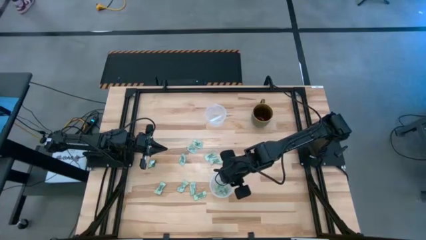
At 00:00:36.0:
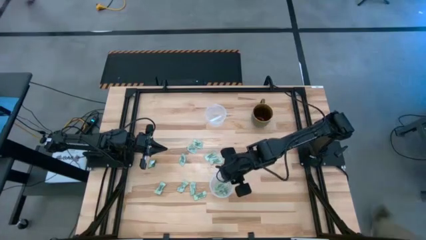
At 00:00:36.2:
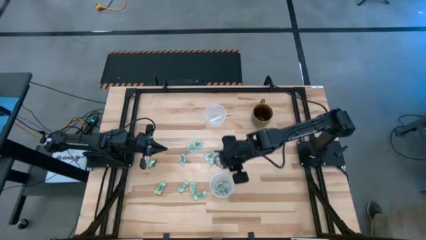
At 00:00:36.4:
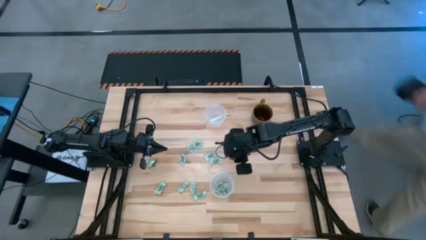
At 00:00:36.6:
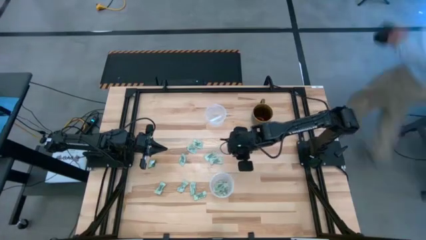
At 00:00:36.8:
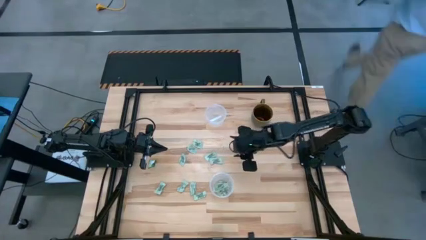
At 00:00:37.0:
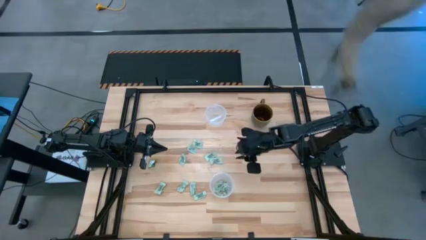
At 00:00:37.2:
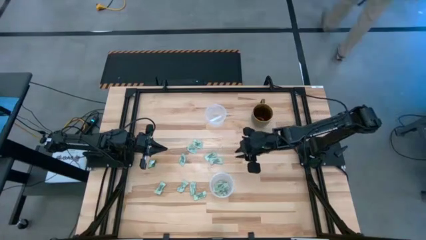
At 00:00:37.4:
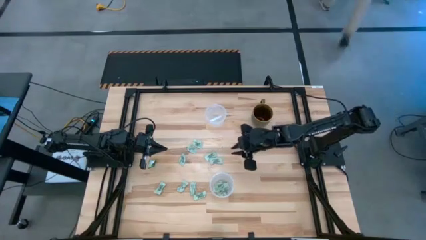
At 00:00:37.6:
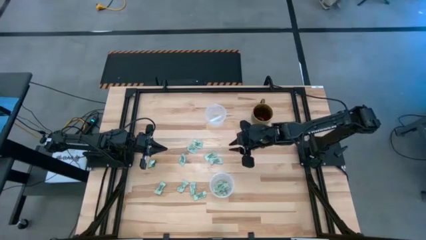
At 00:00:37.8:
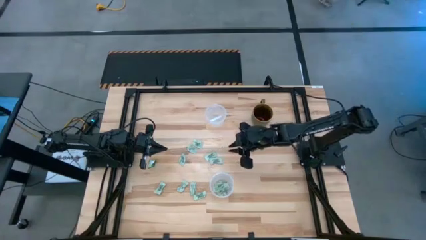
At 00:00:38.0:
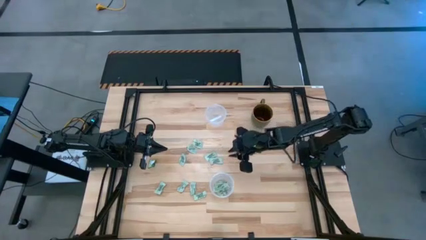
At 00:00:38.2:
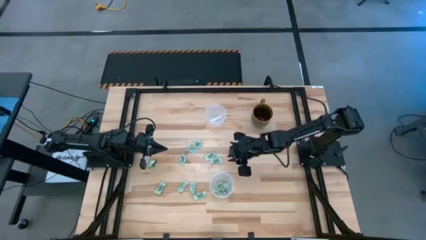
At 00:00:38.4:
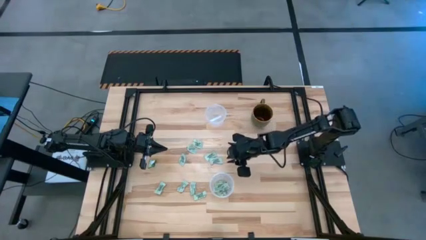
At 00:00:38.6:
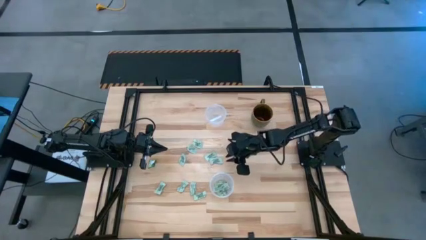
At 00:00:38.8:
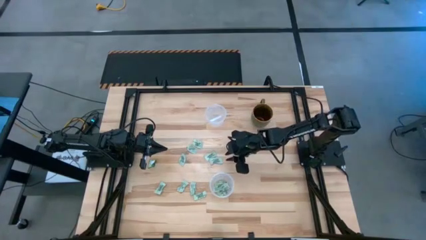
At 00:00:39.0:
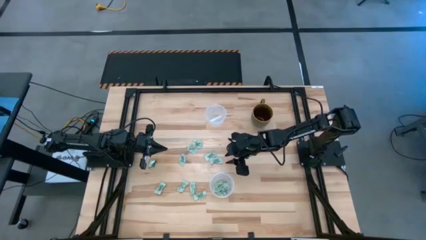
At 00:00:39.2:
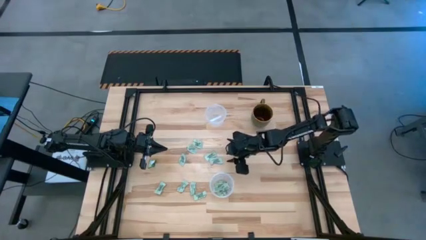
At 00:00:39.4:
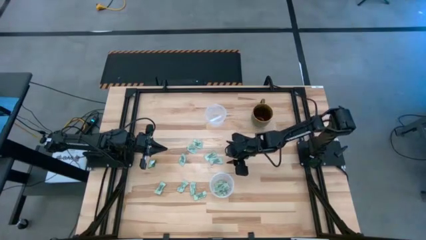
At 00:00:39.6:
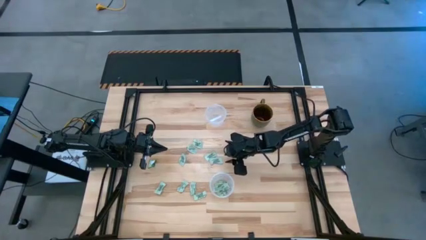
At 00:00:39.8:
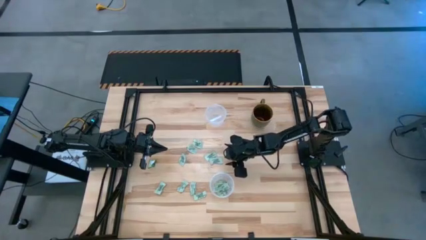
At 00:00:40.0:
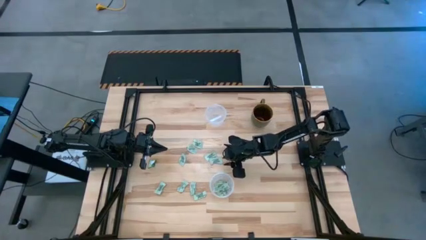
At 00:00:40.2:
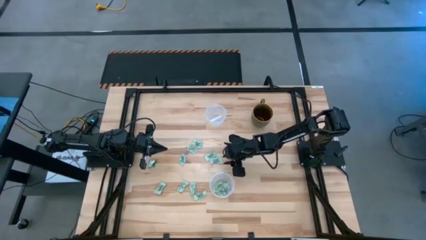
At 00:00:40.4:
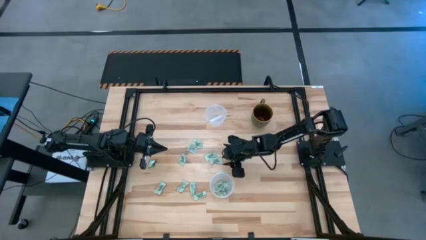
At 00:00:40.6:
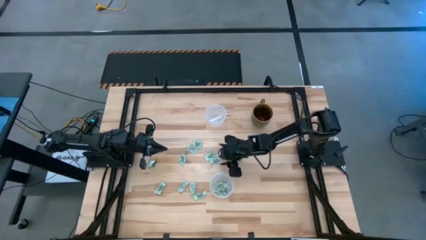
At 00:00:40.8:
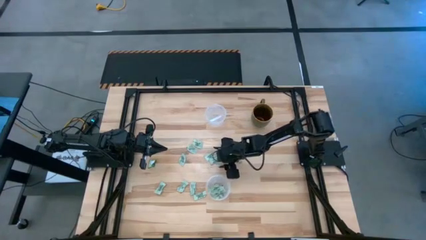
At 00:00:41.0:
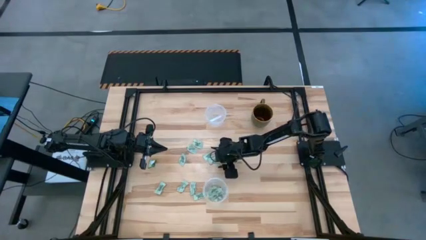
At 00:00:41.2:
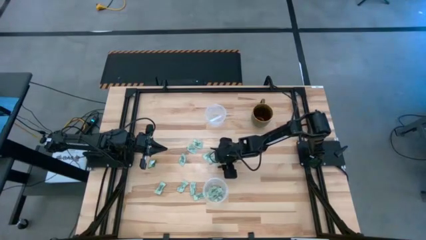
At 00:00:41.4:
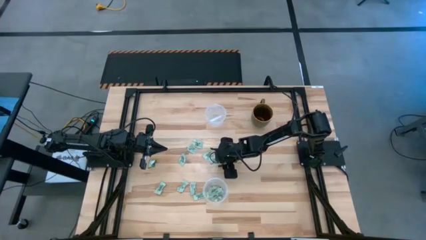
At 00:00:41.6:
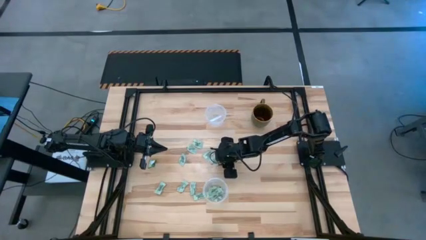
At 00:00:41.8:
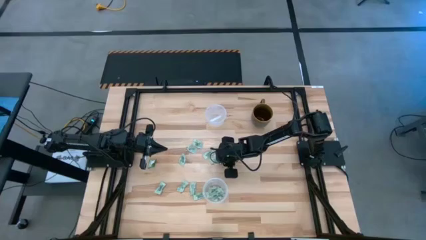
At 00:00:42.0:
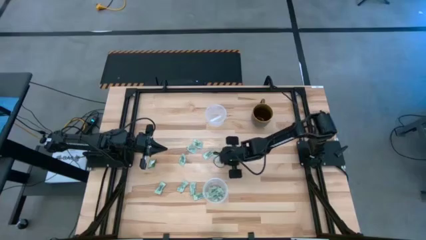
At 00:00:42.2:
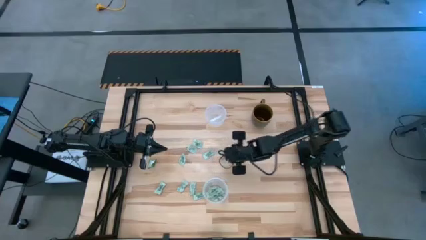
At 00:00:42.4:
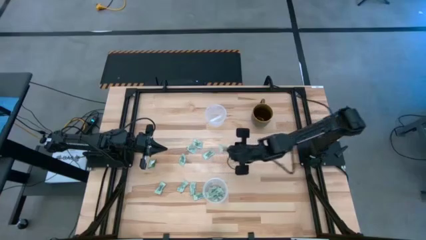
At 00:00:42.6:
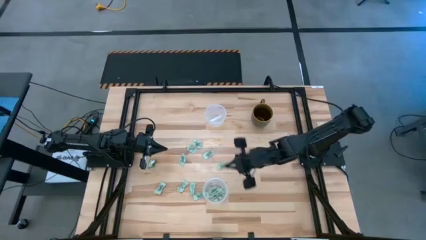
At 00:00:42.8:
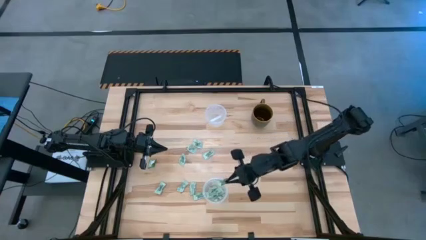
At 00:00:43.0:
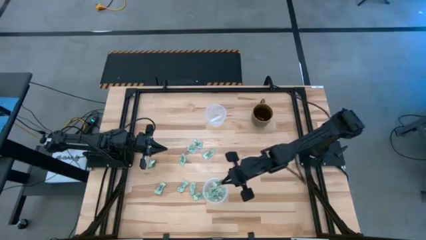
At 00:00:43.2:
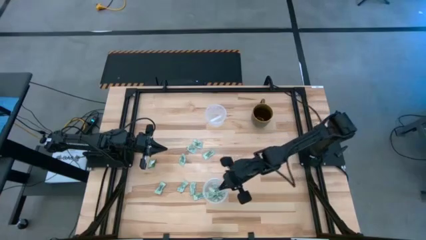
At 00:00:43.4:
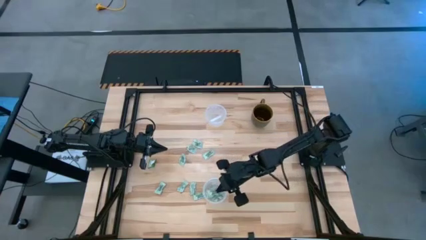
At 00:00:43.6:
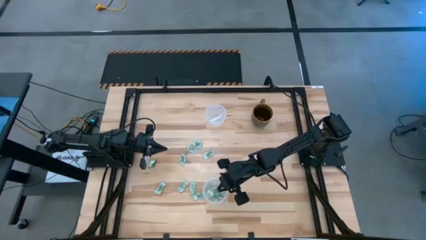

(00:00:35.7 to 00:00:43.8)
Task: Pick and place Stevia / Truvia into bins
Put the stevia packet into the bottom transparent container

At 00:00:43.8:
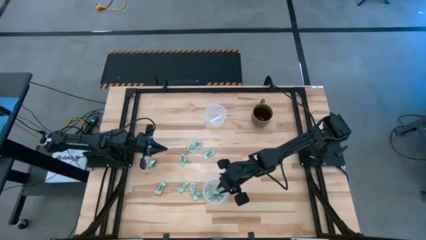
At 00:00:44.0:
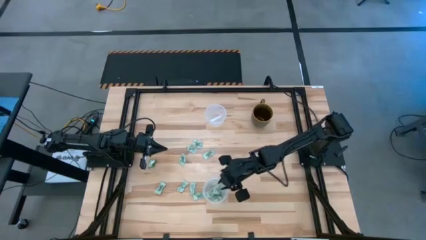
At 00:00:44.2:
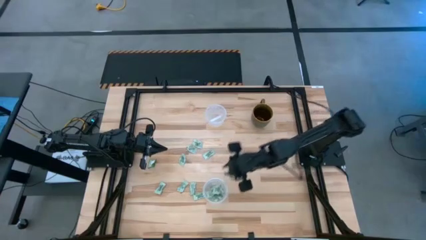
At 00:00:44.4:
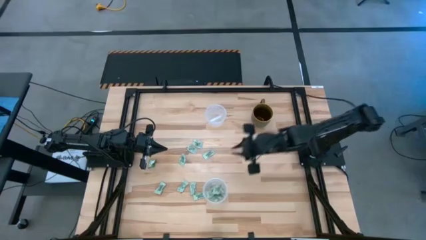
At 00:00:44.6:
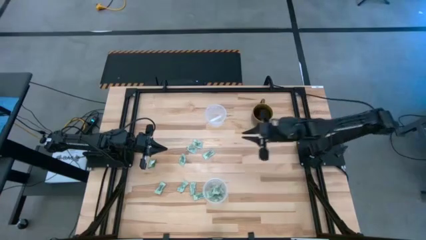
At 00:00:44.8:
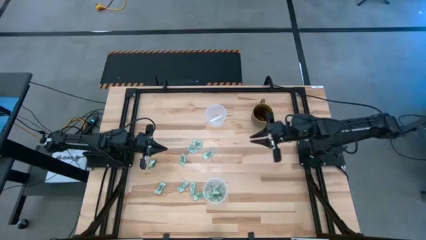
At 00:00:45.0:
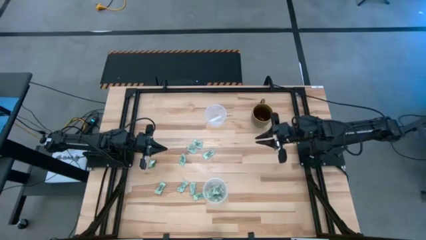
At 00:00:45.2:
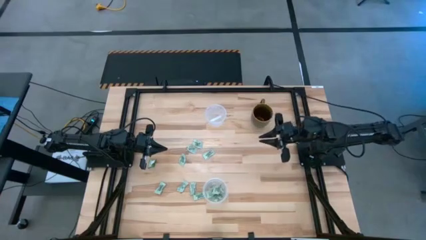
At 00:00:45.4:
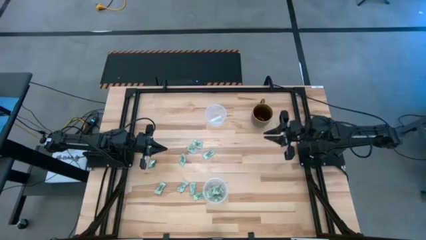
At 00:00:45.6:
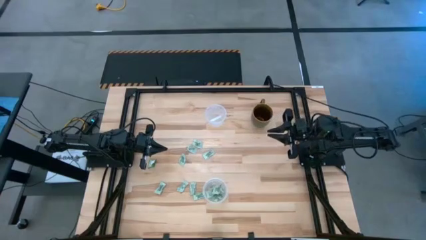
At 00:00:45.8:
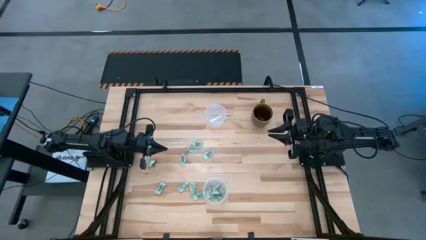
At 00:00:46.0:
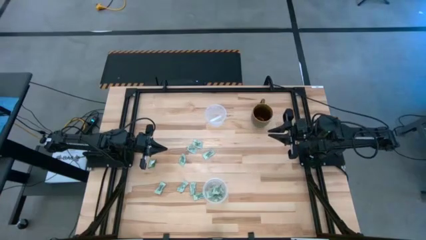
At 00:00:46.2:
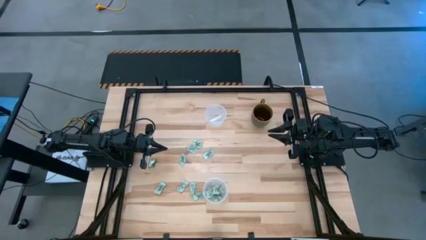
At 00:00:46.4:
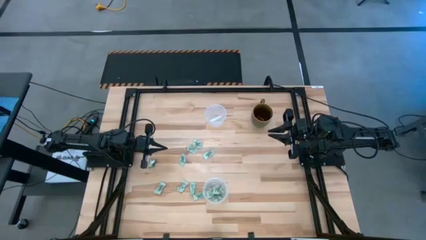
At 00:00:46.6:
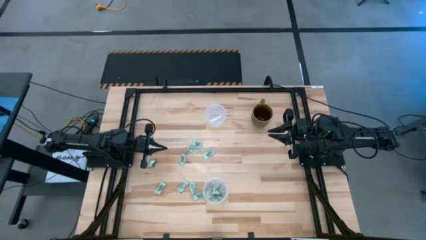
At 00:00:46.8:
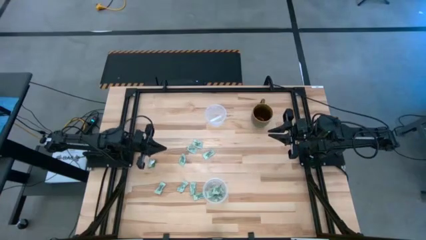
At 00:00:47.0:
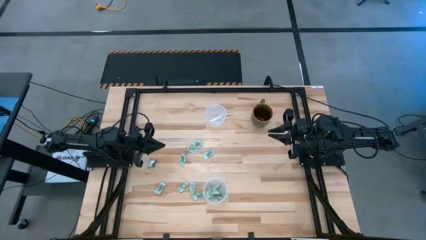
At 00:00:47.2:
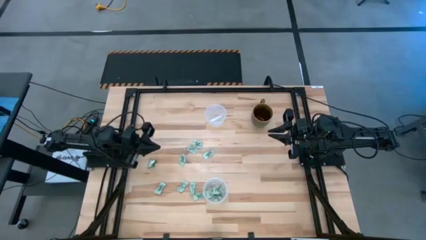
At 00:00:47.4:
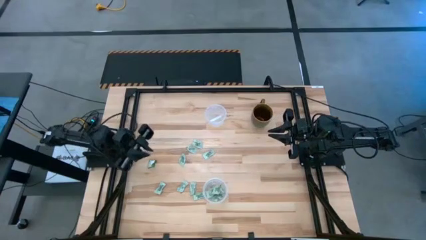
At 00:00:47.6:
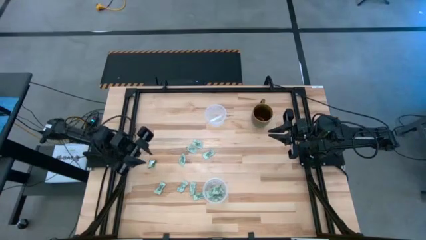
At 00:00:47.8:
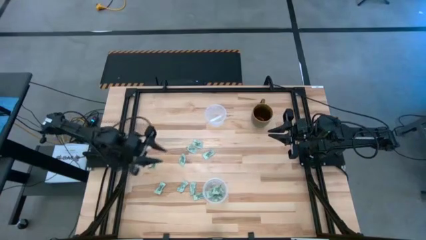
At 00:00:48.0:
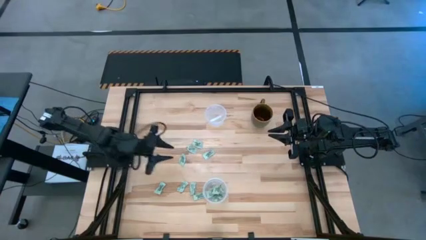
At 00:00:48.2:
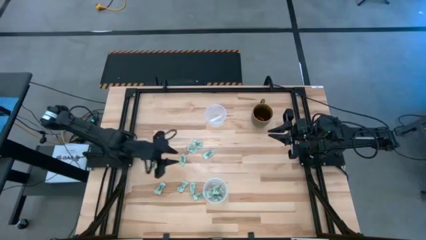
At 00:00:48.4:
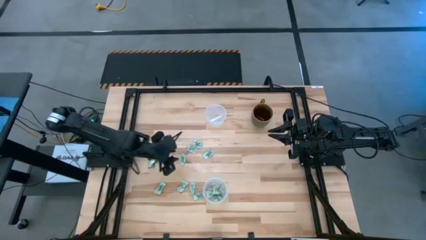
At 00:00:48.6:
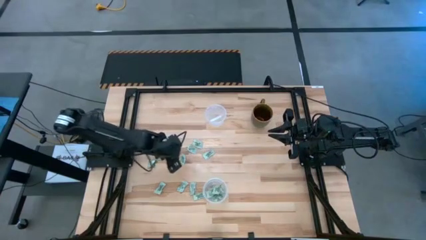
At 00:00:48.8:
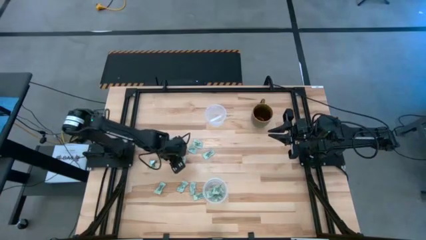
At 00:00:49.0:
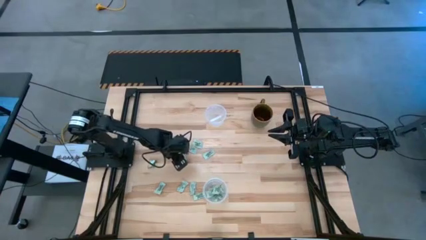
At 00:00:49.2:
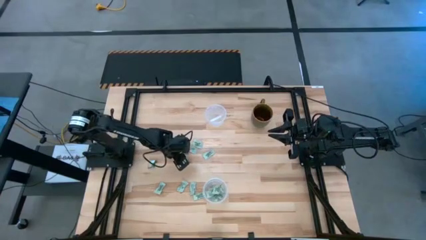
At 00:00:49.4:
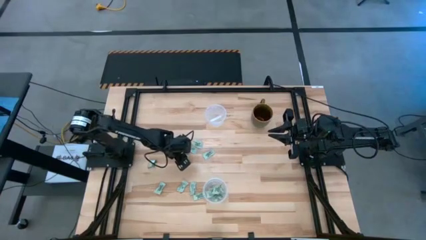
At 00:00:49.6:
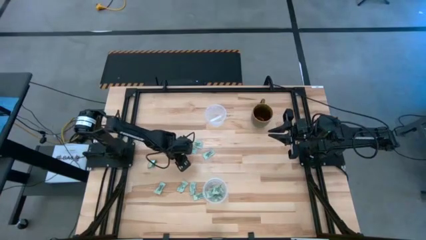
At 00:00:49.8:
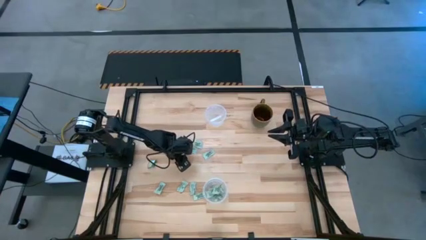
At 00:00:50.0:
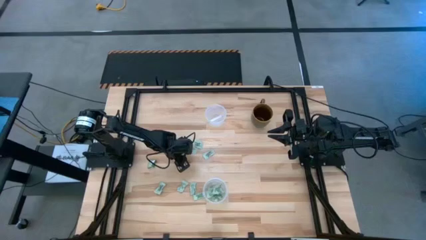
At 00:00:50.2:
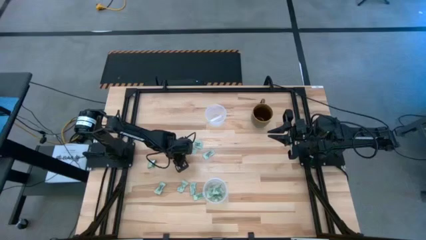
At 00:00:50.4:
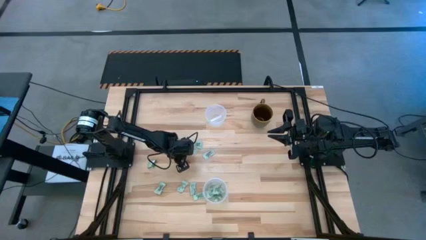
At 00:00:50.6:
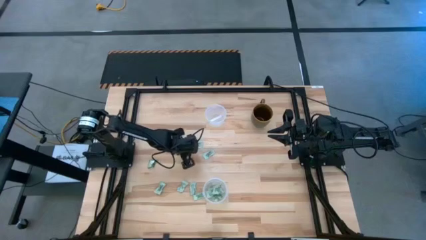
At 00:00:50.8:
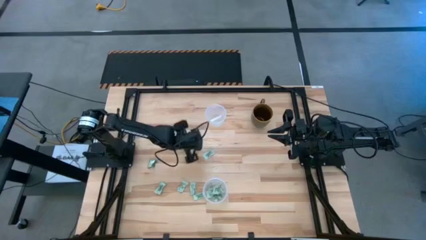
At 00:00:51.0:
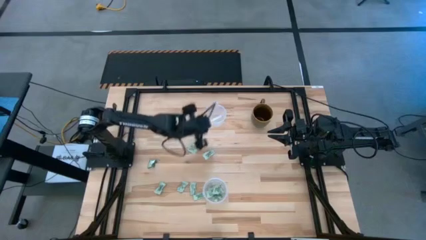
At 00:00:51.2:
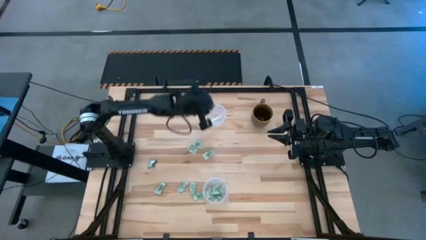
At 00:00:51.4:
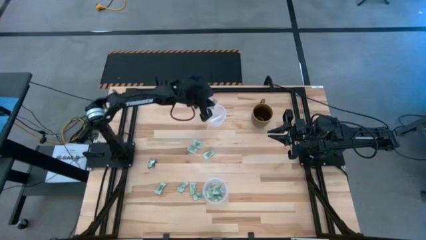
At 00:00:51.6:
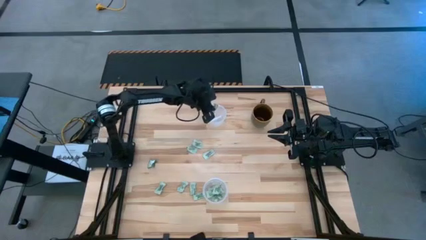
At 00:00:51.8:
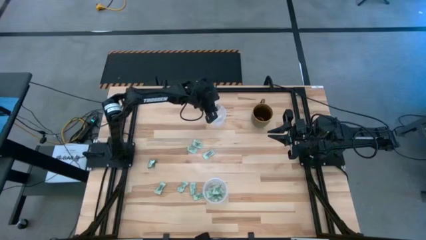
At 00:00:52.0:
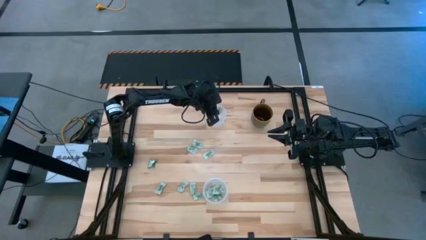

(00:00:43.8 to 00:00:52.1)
Put the stevia packet into the top transparent container
